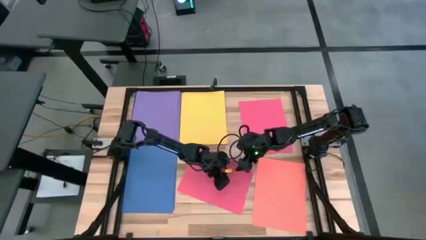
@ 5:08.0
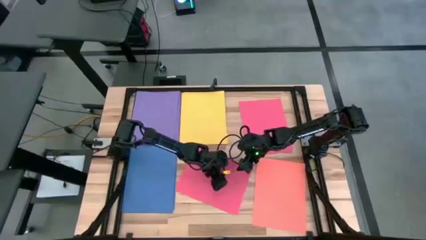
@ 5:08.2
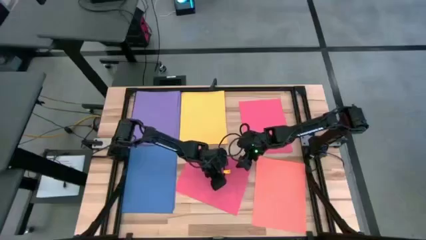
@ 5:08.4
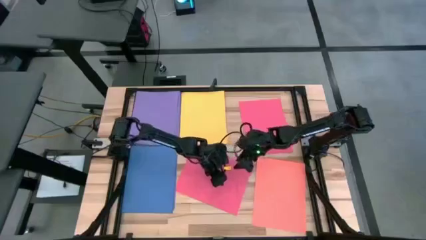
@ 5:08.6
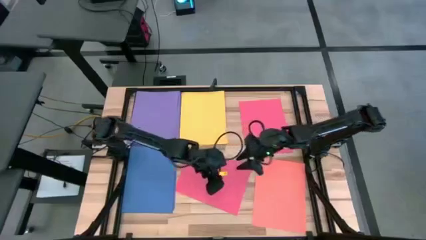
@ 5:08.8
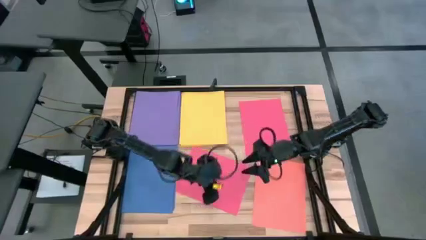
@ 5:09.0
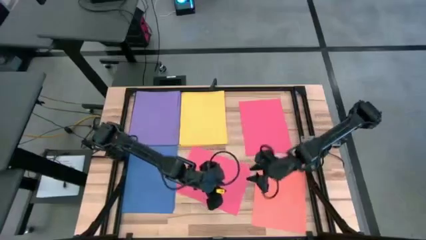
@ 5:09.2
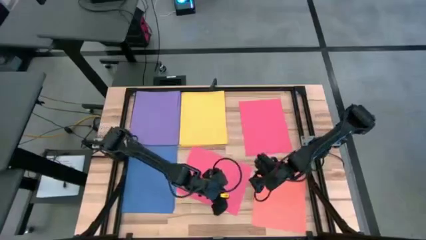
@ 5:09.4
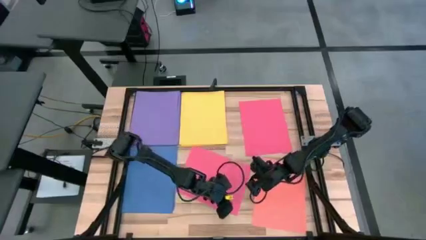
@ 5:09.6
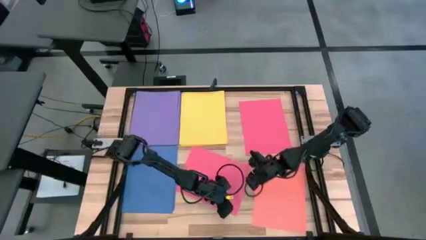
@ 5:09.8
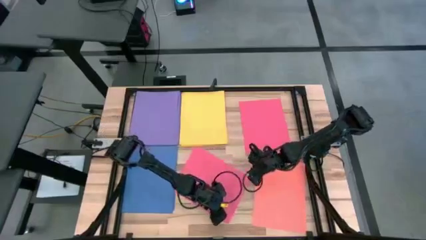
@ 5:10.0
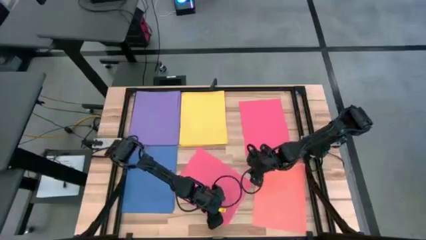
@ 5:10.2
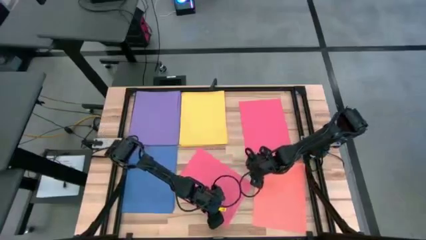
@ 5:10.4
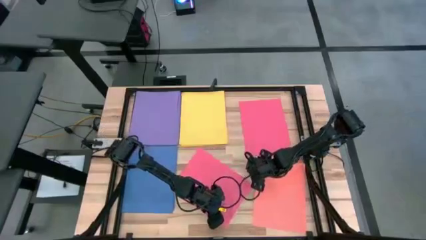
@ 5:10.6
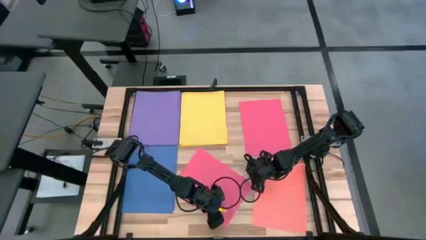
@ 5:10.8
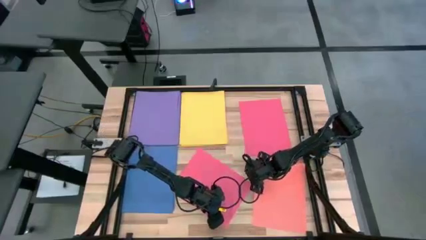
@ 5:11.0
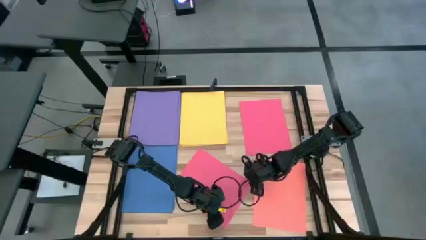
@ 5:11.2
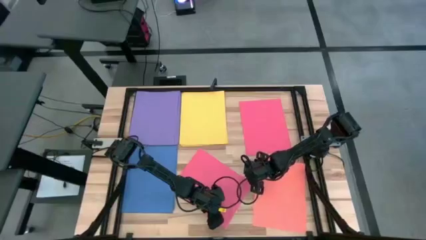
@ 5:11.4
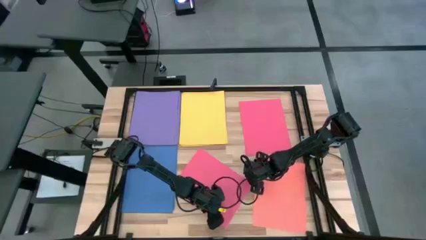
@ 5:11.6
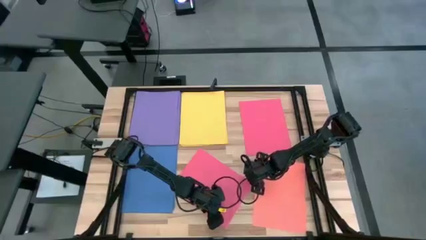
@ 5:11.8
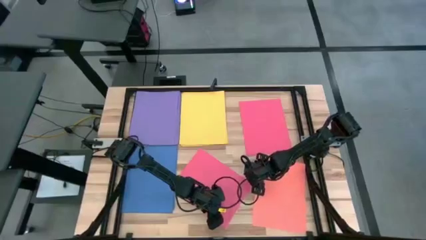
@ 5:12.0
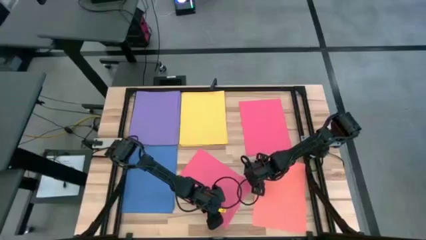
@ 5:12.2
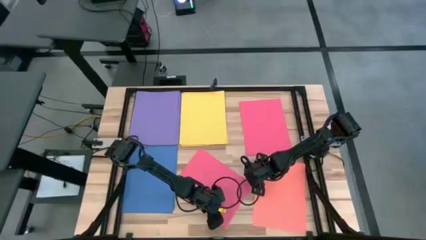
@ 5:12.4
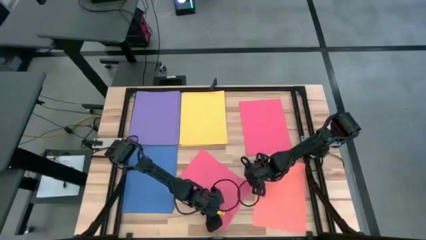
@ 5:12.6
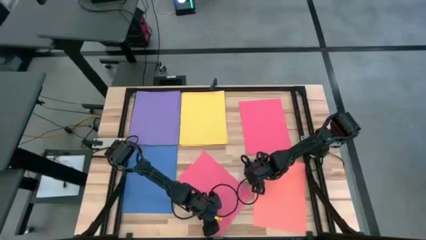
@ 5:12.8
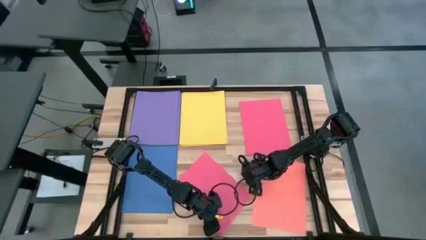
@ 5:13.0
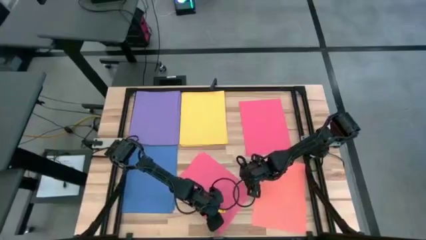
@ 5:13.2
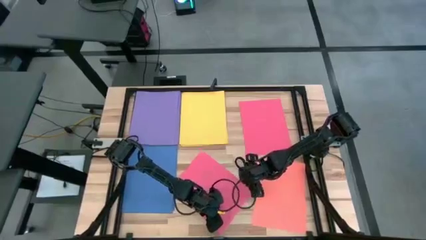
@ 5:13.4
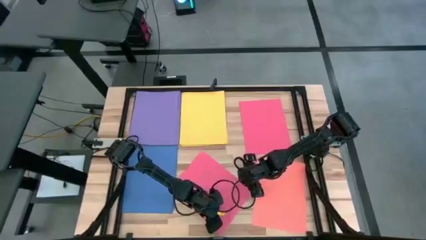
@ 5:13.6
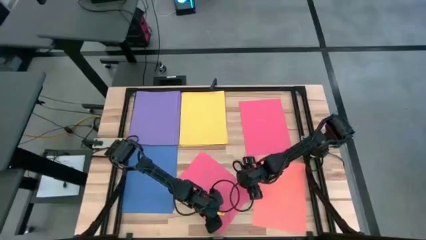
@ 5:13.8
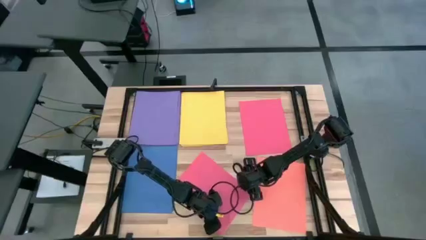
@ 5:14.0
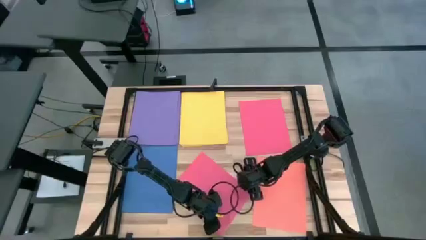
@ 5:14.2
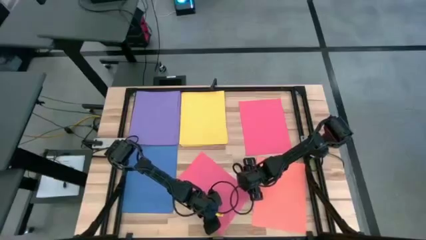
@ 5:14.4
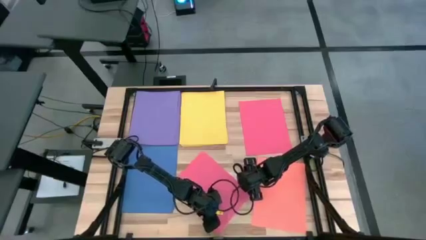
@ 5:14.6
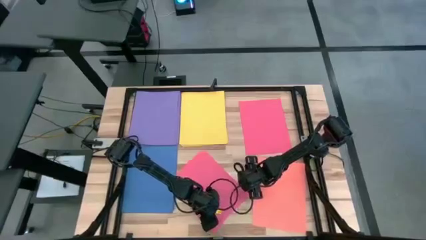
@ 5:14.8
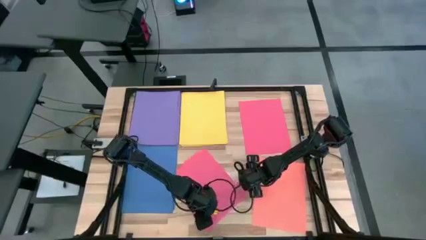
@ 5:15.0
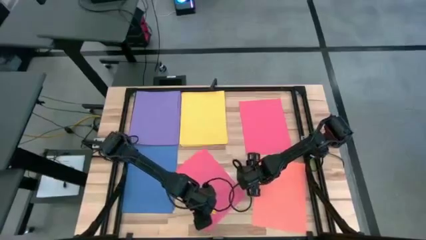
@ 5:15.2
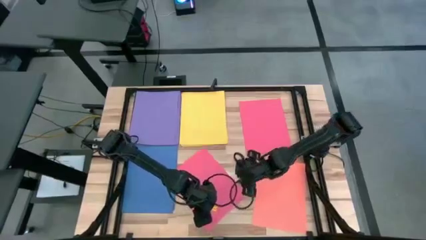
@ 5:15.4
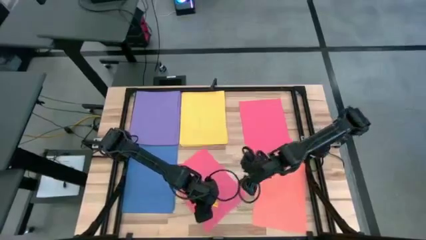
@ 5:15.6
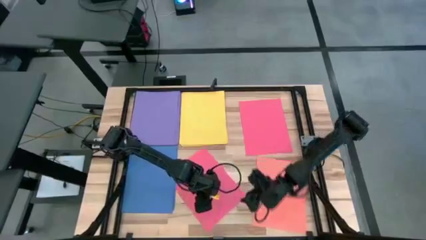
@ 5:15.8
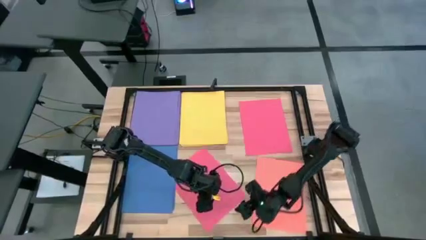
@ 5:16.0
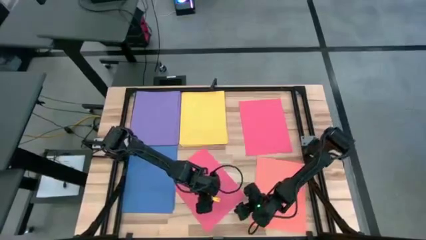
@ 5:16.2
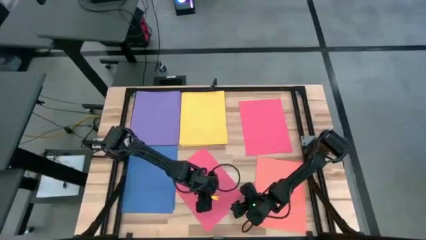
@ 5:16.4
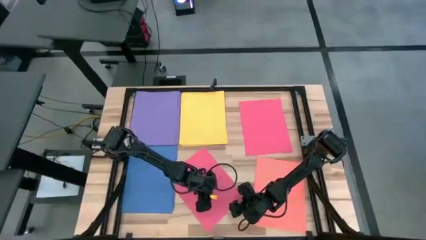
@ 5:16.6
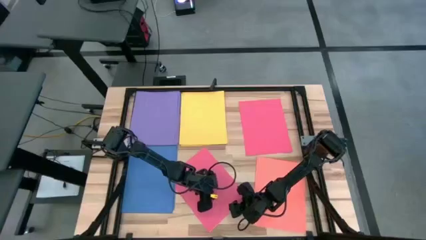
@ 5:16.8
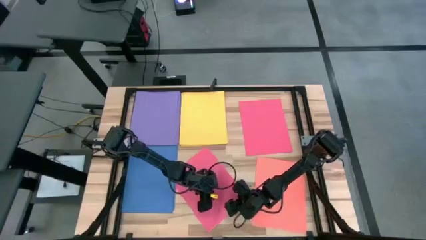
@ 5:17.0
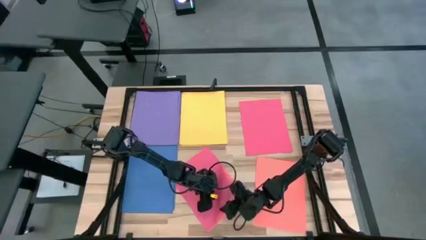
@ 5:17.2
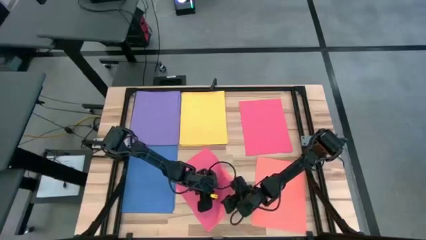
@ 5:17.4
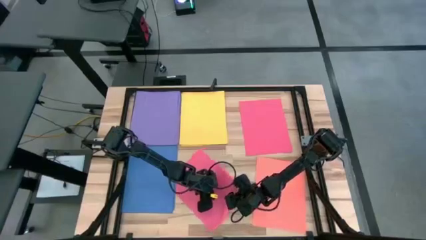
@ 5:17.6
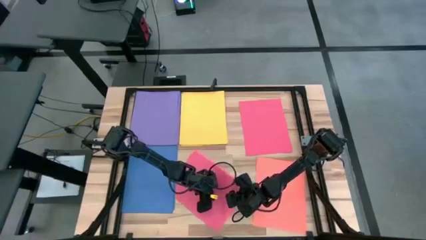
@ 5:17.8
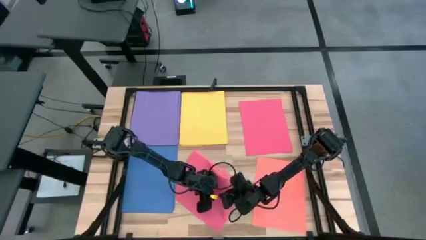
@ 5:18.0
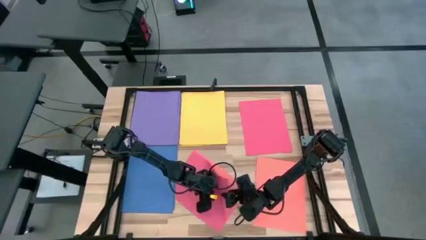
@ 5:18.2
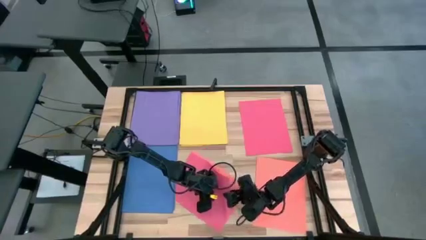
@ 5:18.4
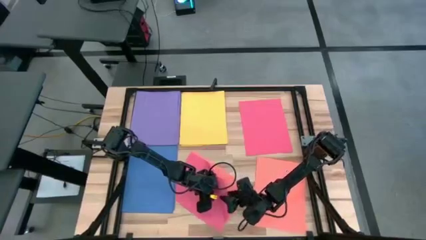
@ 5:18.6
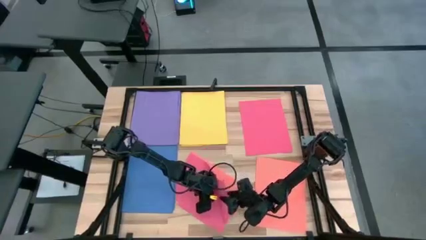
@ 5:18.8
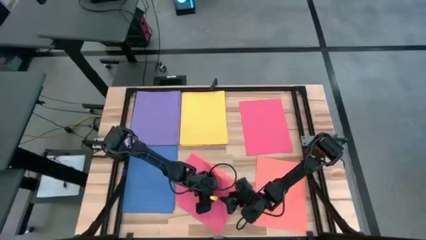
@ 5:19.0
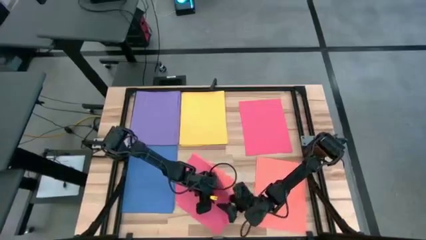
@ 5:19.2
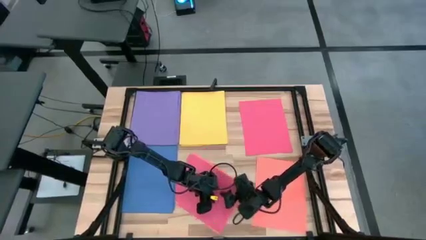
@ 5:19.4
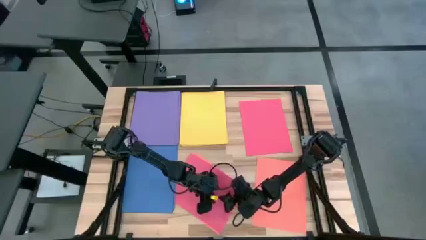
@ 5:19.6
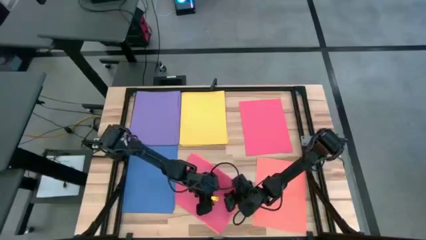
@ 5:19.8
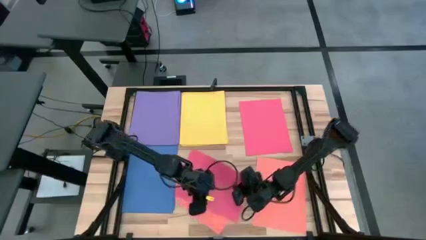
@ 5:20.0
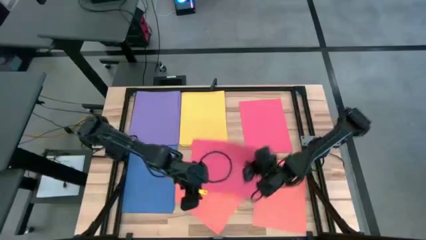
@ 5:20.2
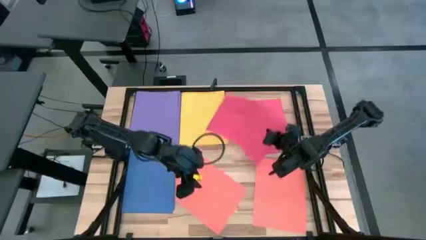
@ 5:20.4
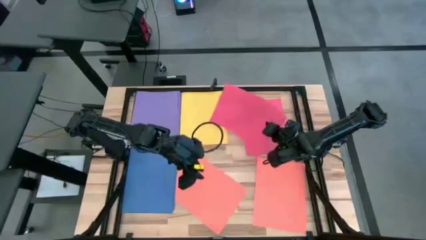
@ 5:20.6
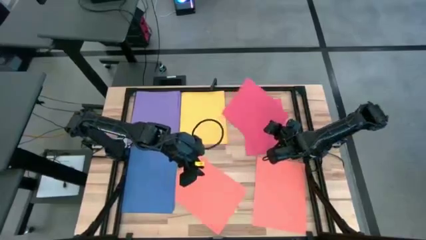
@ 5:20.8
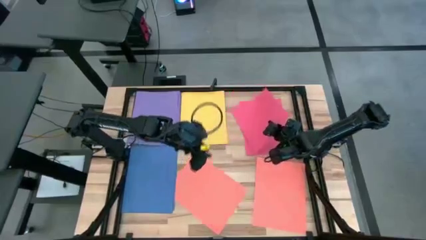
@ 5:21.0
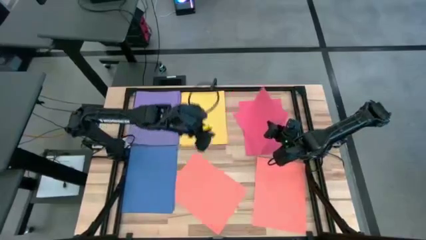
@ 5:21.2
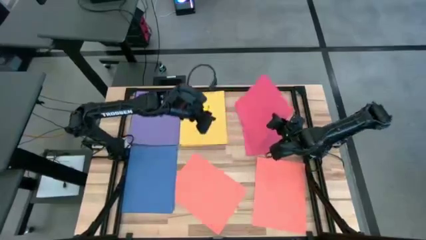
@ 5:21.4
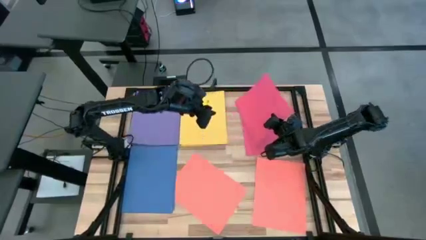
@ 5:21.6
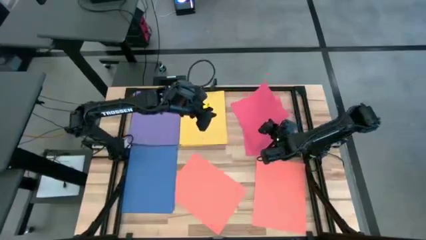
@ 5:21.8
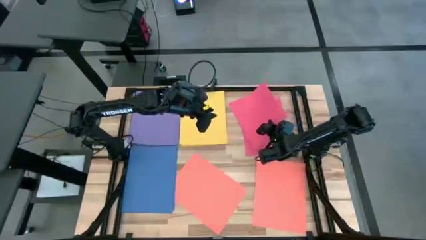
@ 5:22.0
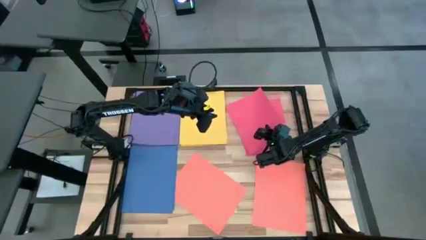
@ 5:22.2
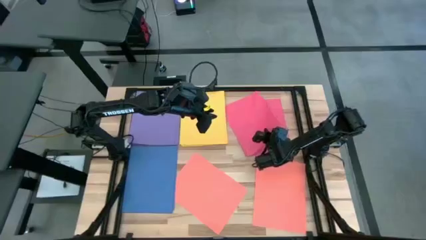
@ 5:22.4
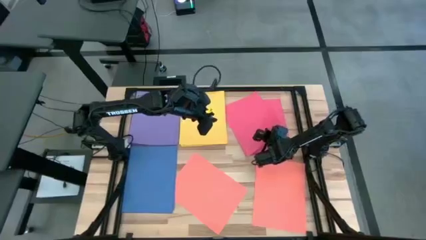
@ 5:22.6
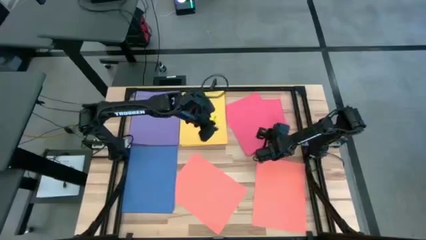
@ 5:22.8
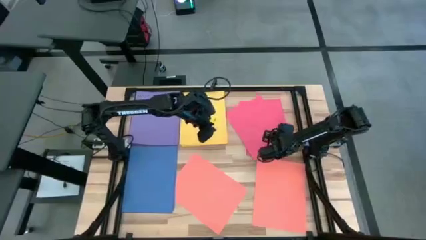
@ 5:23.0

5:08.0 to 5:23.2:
Task: Organize paper
Stack the red paper on top of the red paper

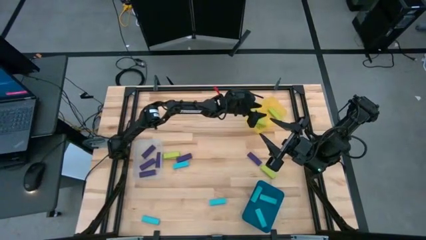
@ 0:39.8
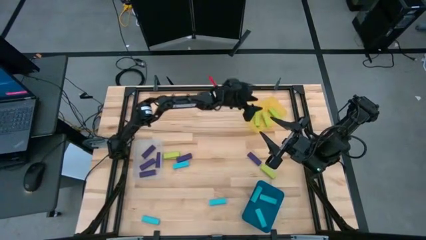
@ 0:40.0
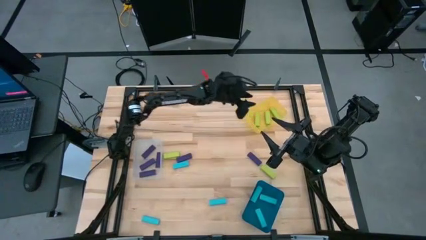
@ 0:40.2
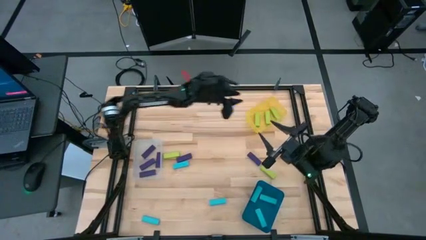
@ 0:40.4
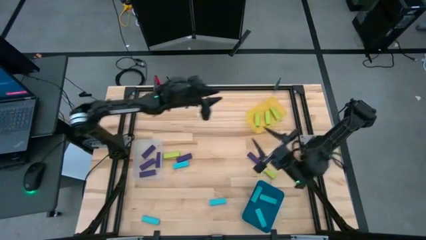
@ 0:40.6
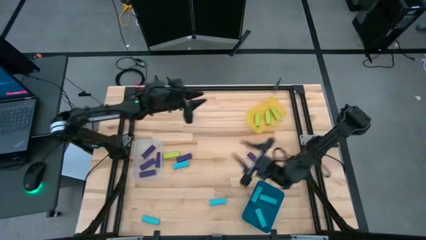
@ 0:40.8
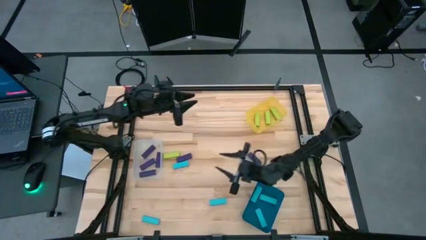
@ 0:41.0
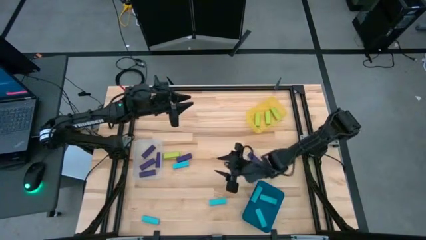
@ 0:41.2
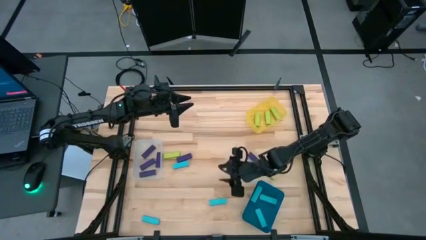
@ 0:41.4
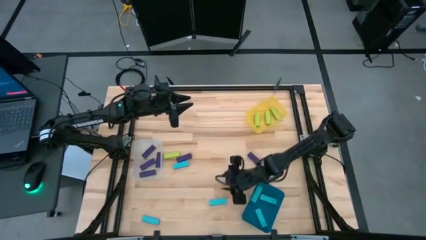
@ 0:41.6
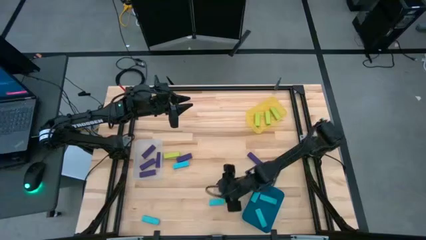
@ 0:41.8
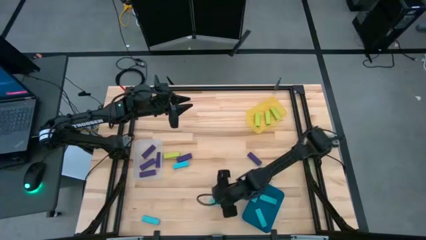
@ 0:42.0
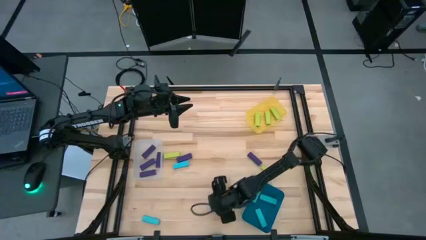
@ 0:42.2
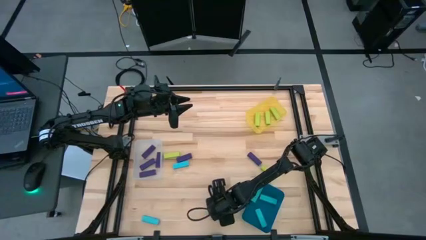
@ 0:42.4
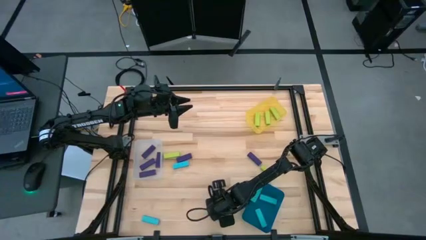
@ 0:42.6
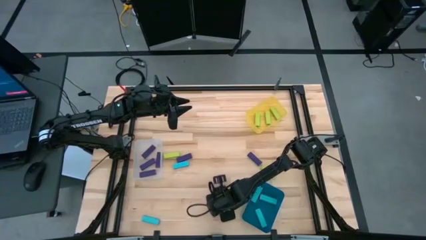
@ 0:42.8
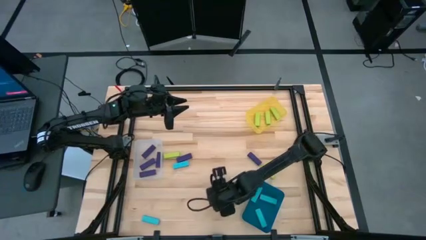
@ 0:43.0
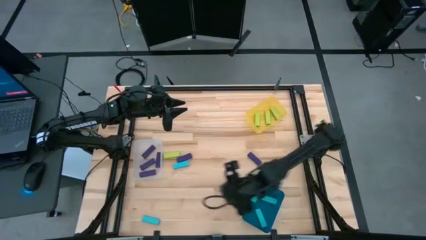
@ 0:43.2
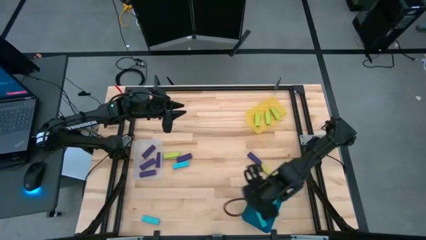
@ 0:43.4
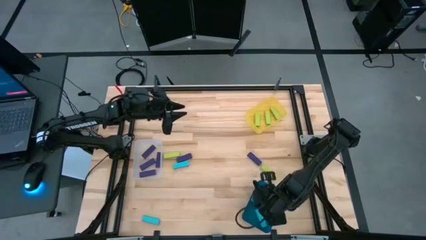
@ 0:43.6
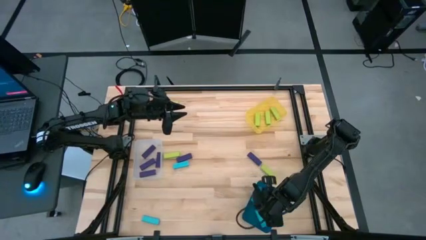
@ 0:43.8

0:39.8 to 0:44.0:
Task: Sort blocks
Put the light blue block into the blue bin
